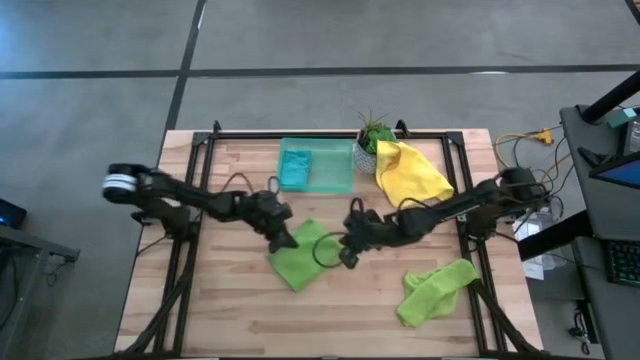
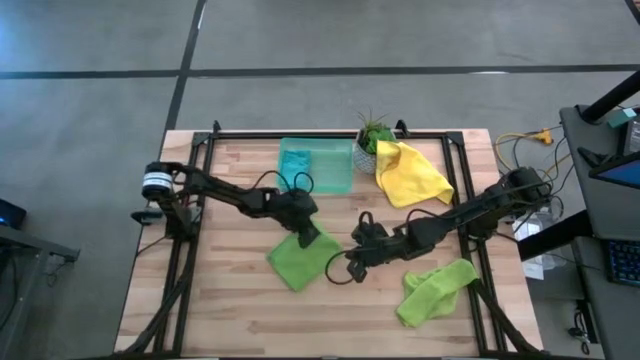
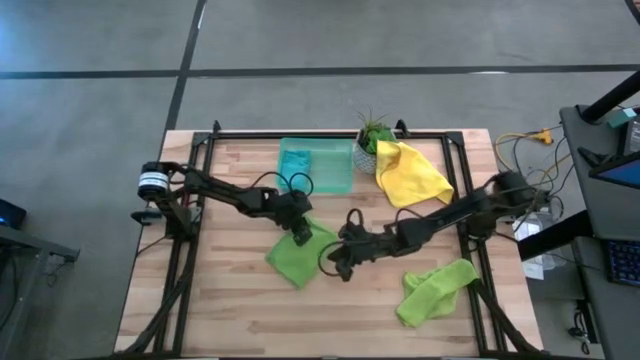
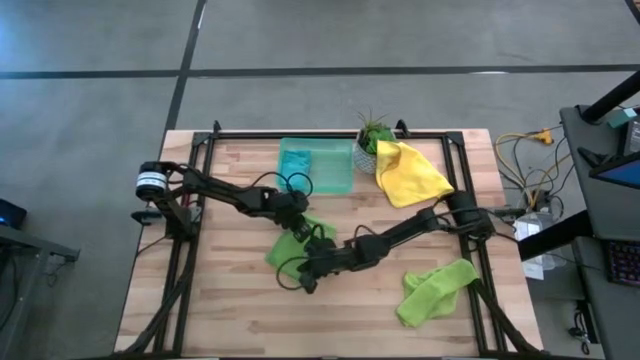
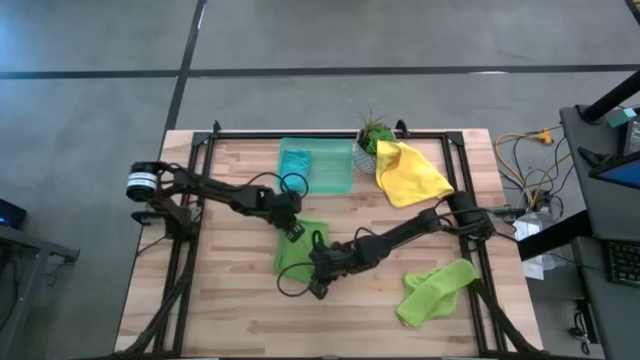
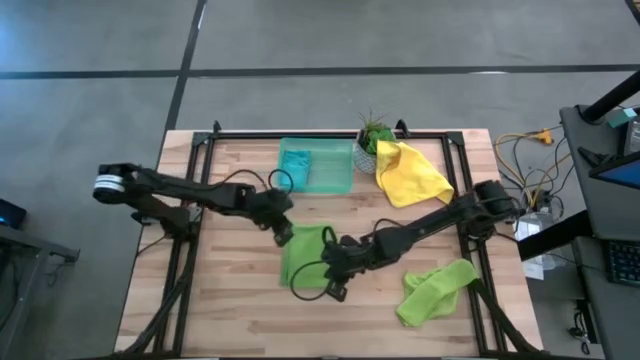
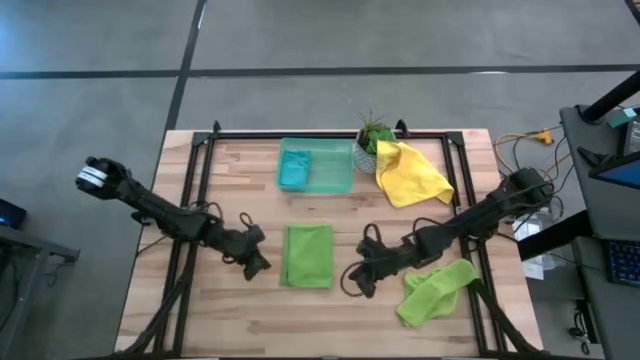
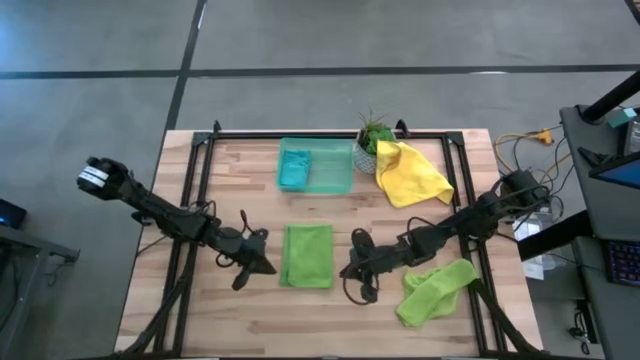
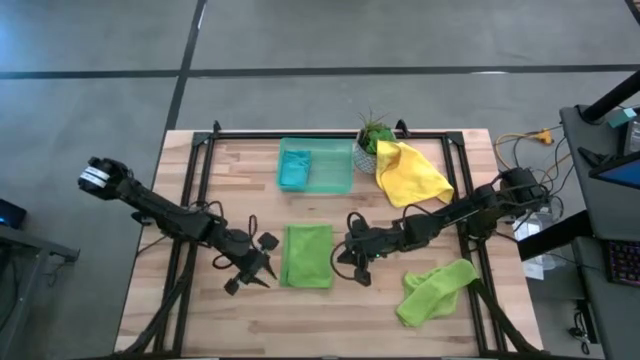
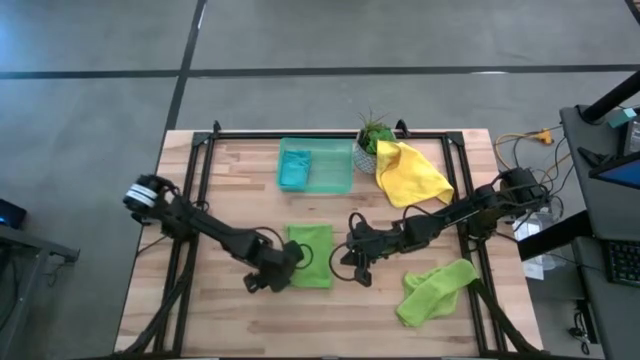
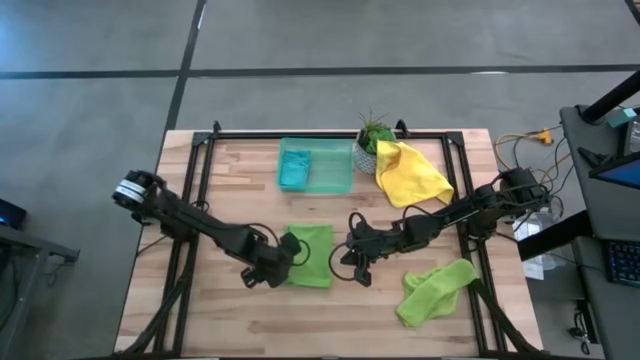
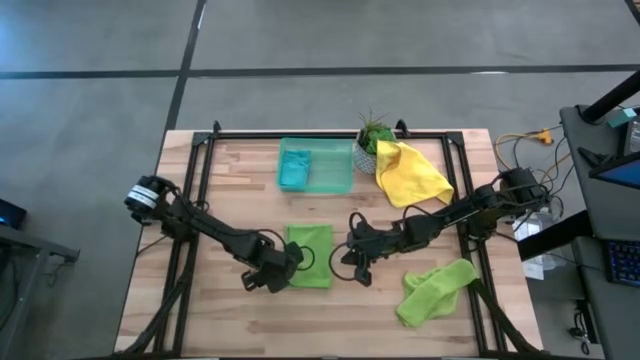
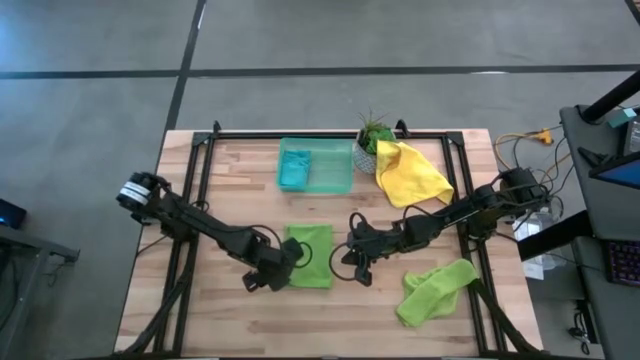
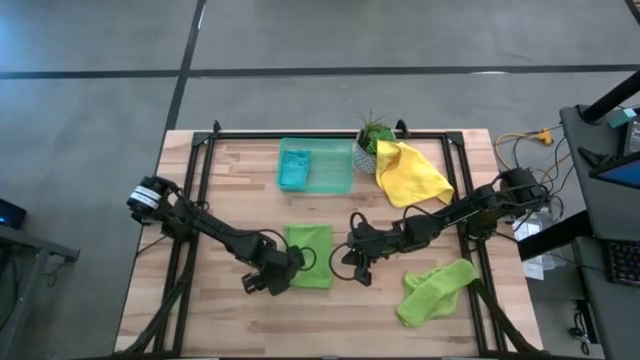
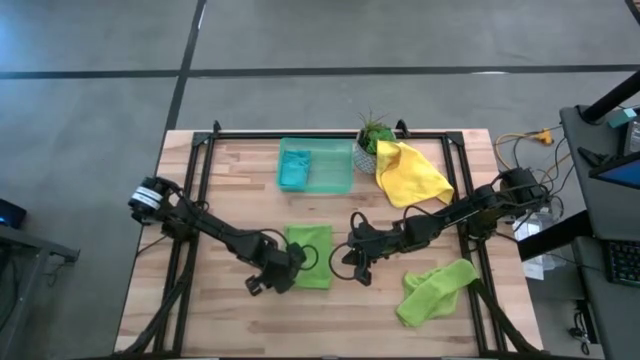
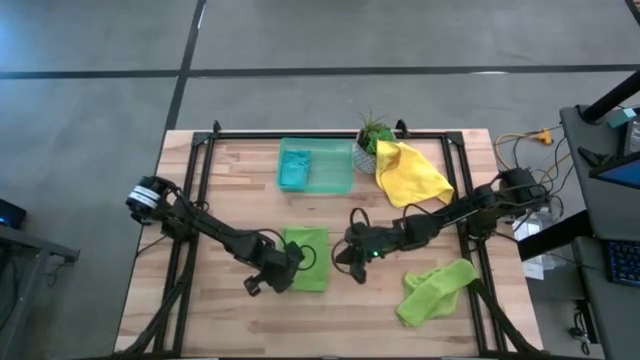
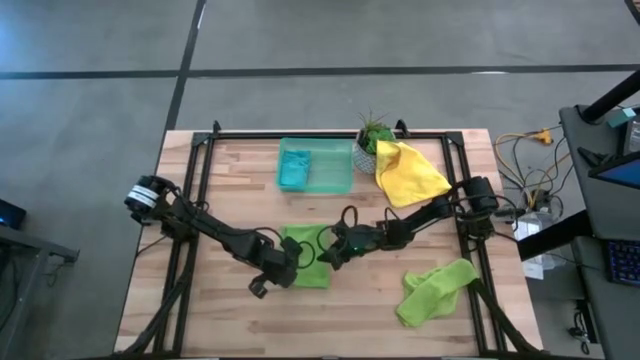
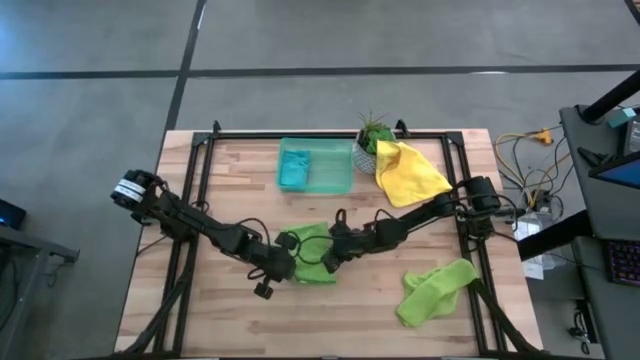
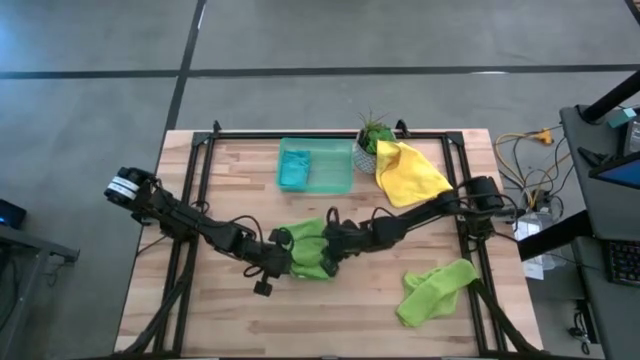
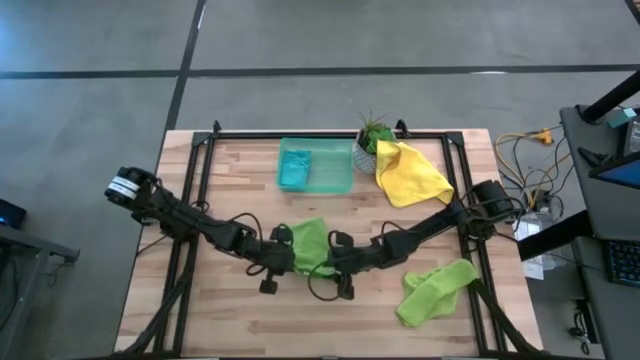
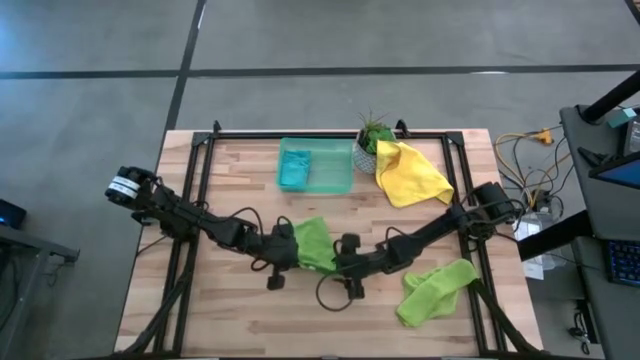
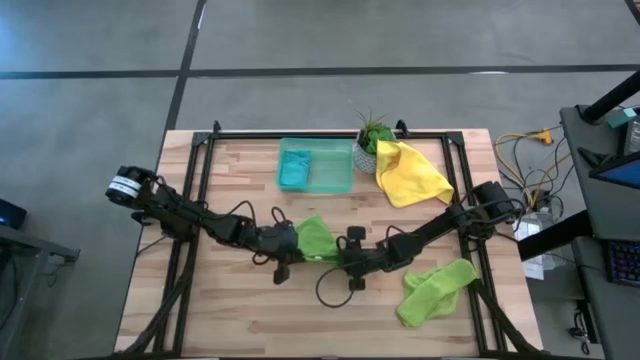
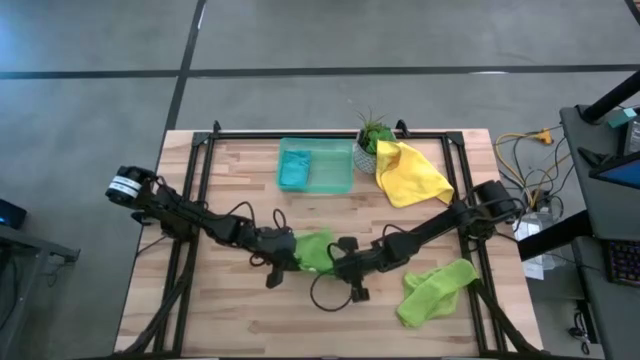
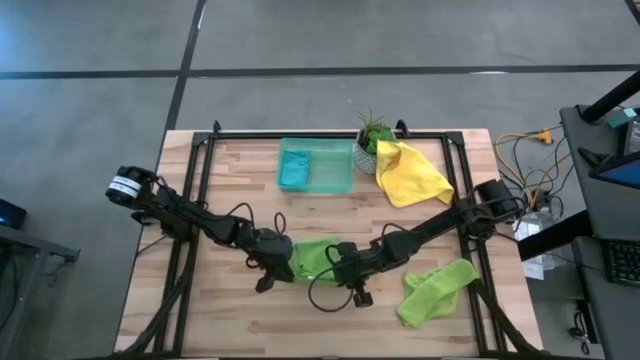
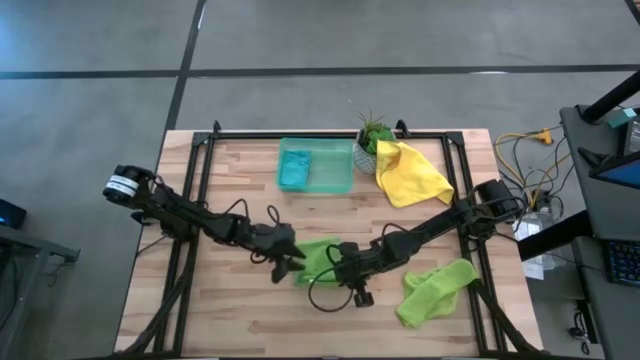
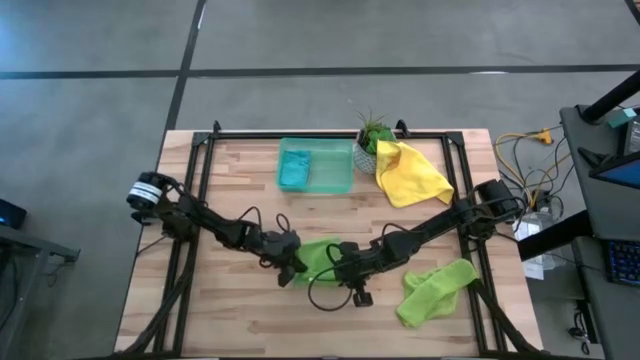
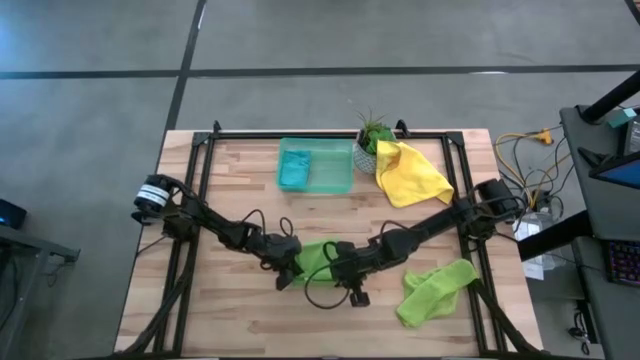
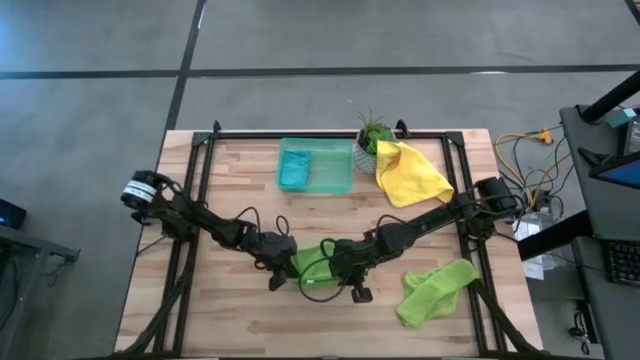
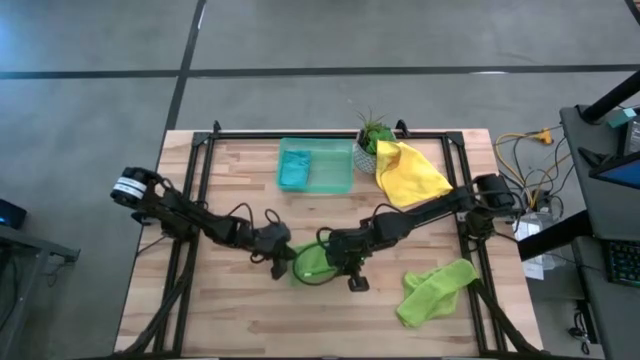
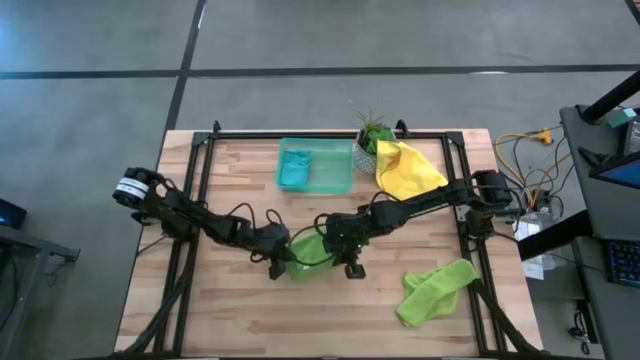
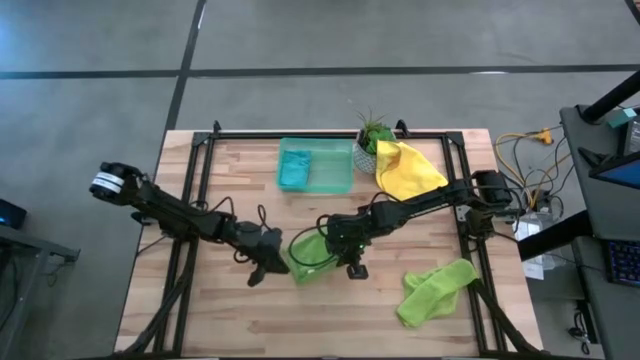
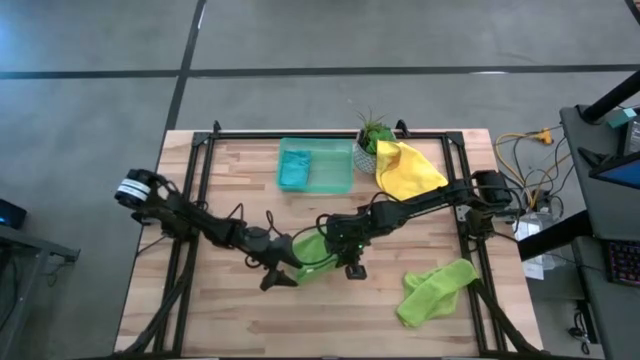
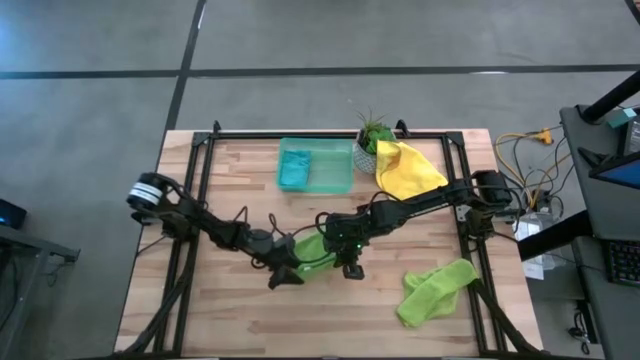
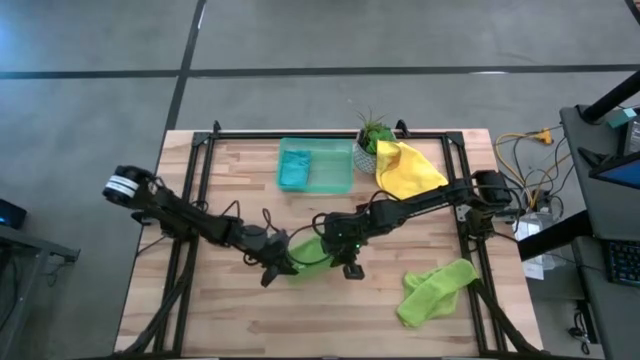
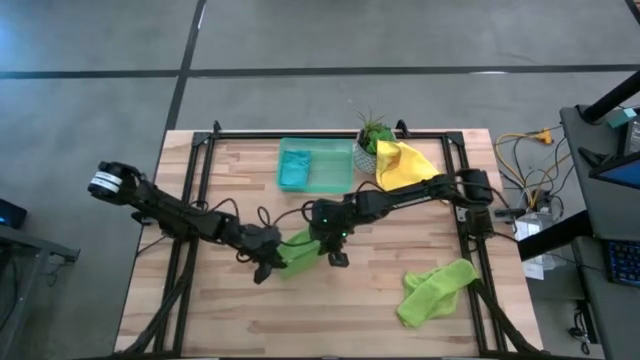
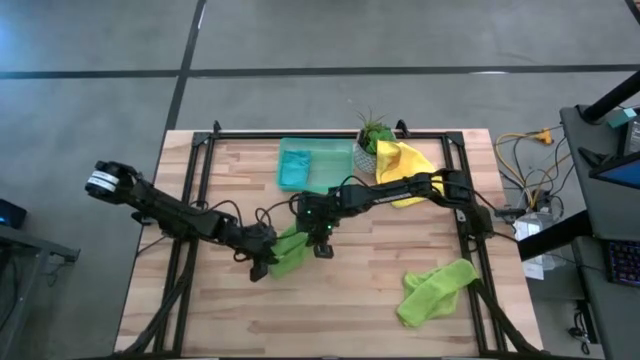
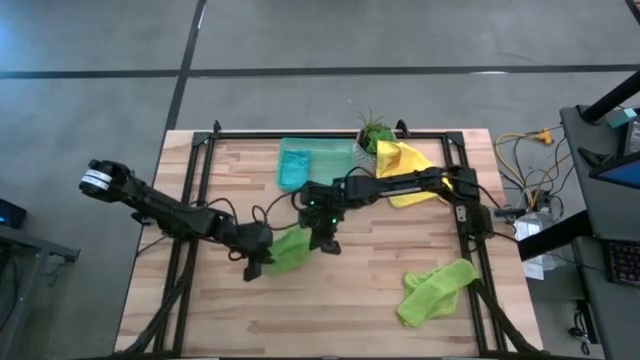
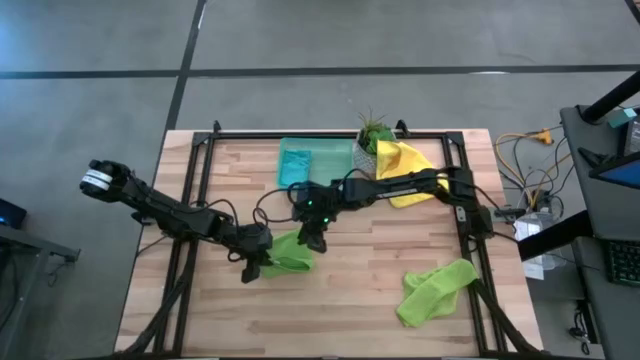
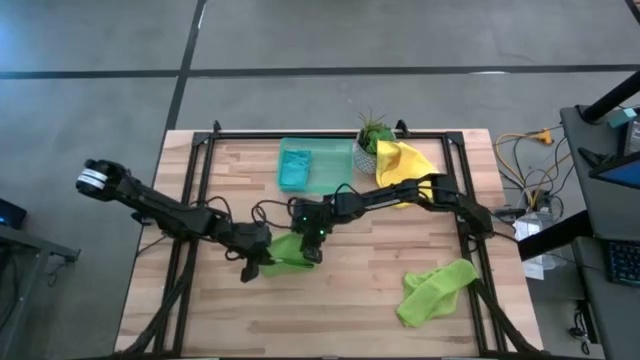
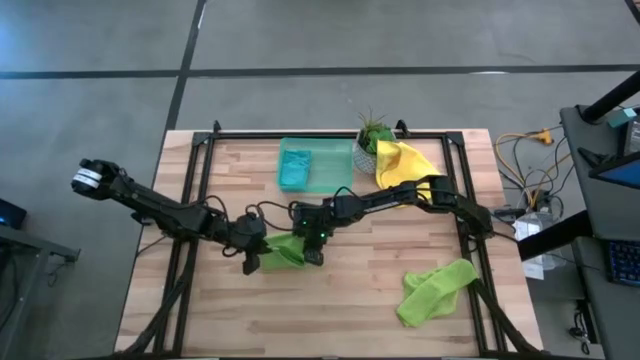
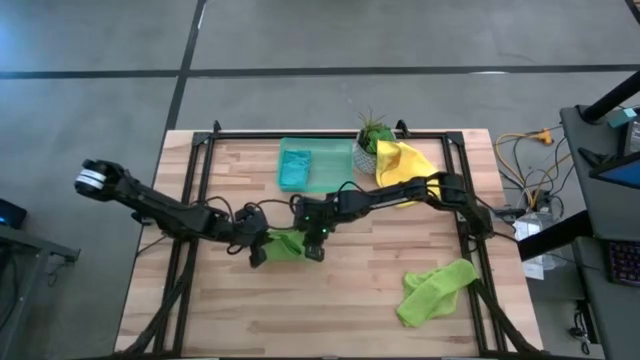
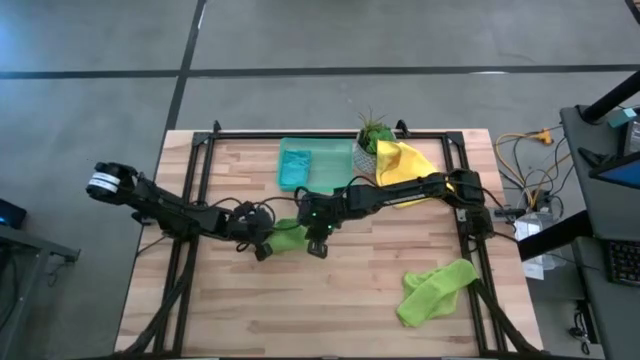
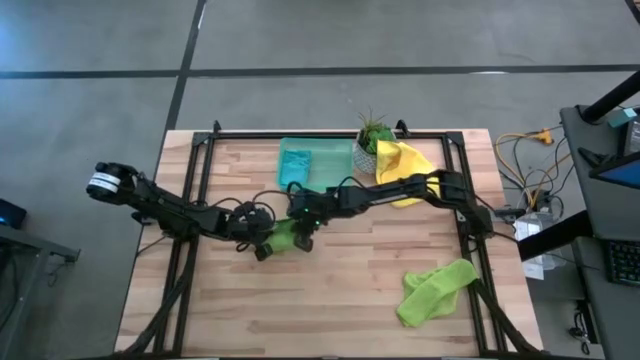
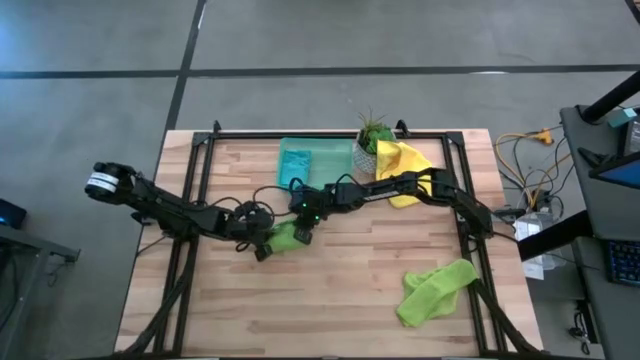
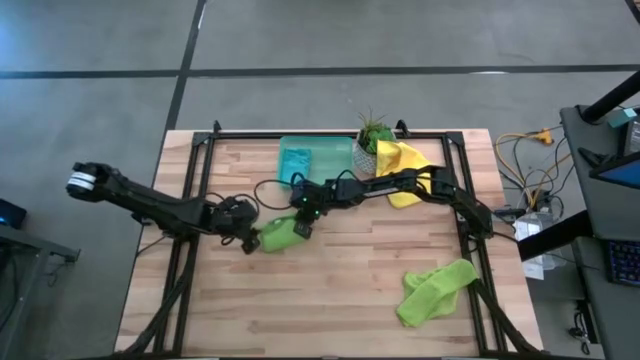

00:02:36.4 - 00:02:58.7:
Task: Fold microfiber towels
Fold the green microfiber towel
